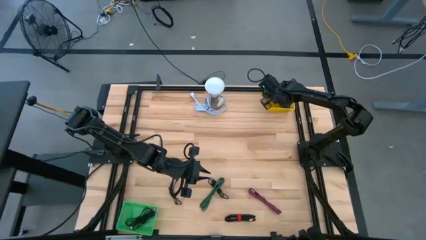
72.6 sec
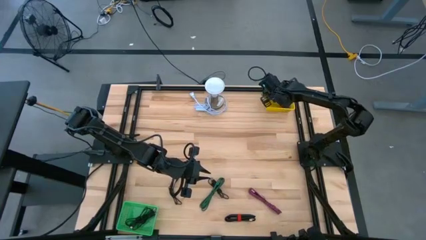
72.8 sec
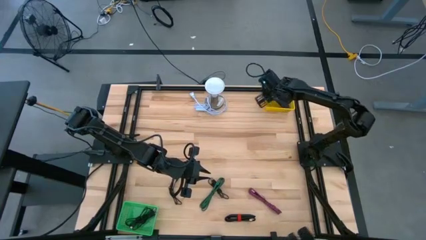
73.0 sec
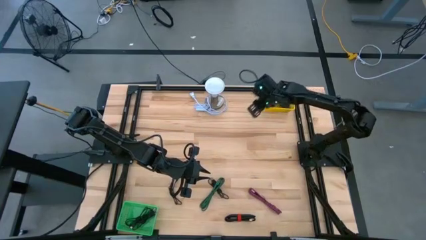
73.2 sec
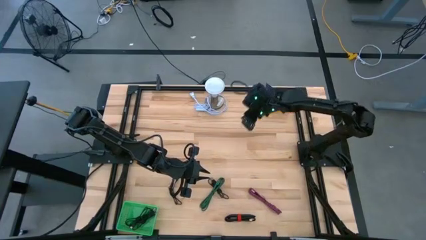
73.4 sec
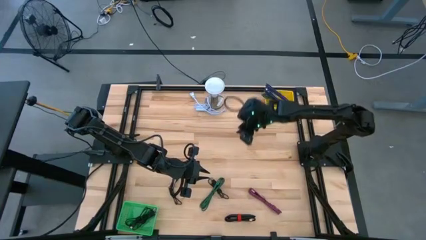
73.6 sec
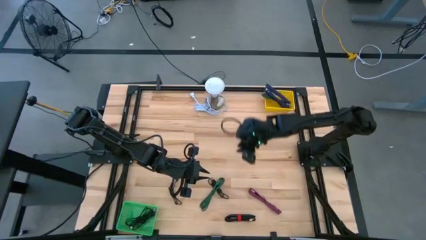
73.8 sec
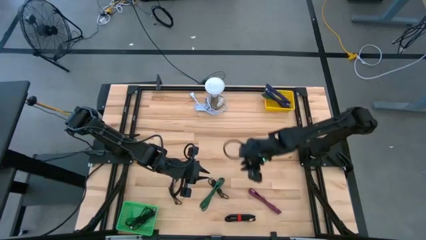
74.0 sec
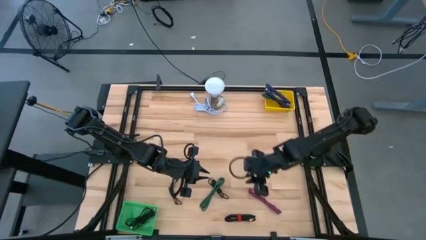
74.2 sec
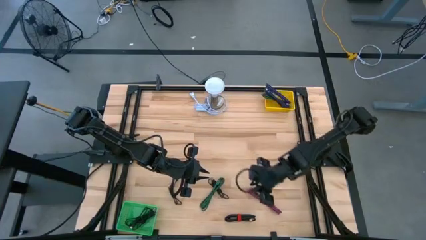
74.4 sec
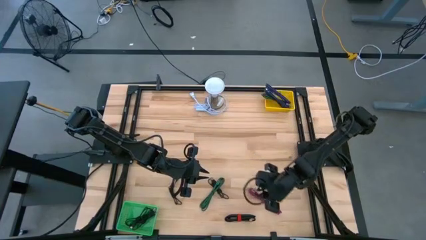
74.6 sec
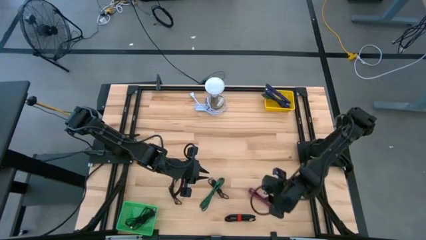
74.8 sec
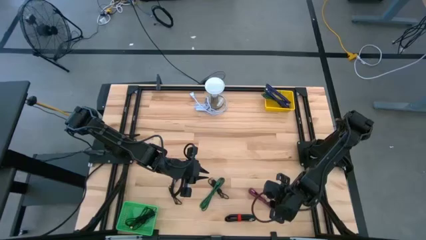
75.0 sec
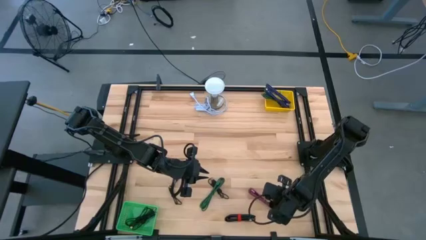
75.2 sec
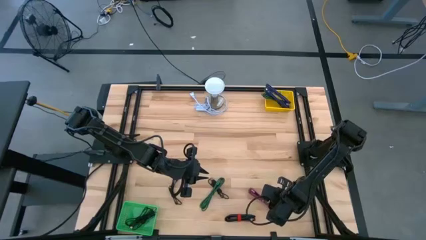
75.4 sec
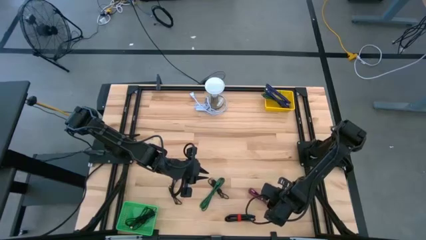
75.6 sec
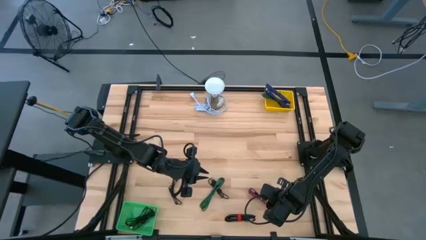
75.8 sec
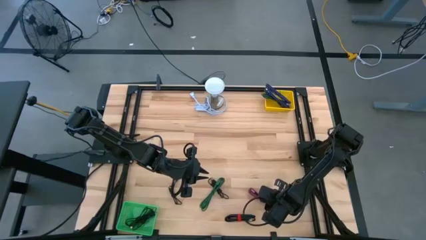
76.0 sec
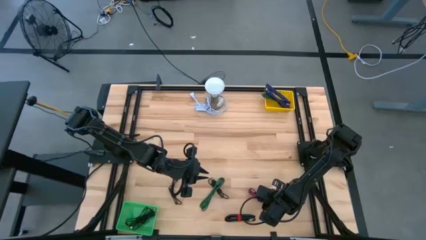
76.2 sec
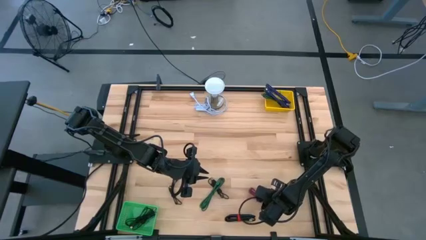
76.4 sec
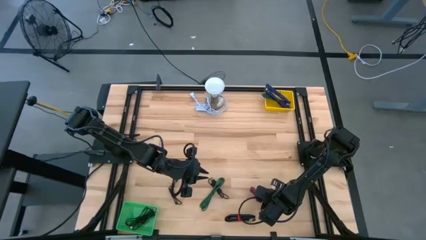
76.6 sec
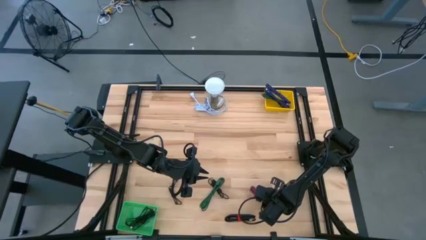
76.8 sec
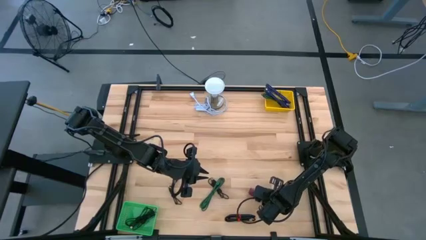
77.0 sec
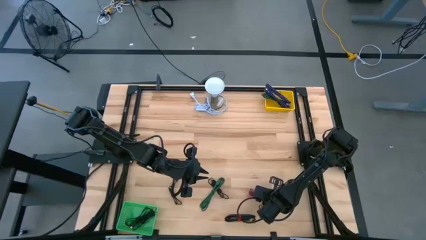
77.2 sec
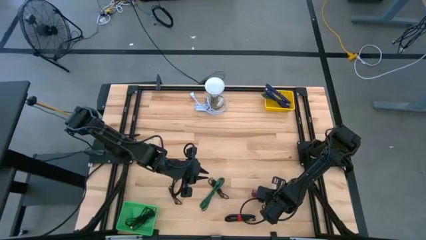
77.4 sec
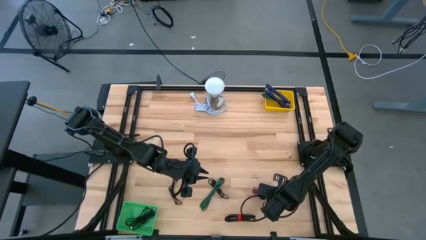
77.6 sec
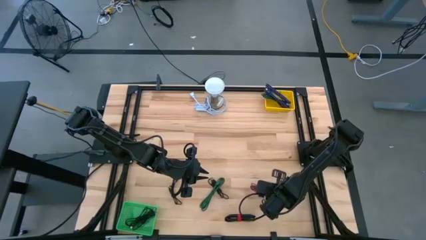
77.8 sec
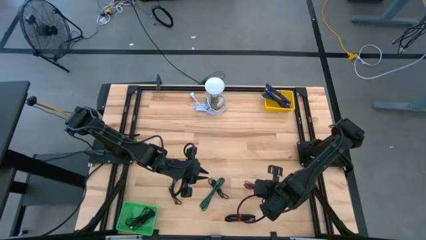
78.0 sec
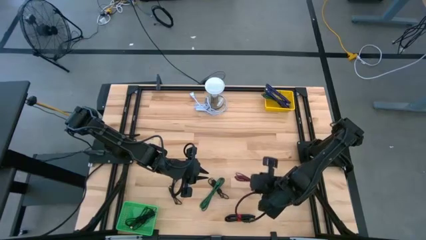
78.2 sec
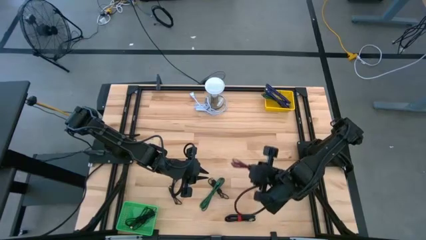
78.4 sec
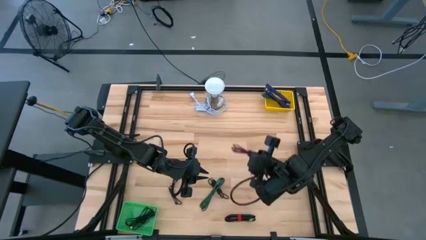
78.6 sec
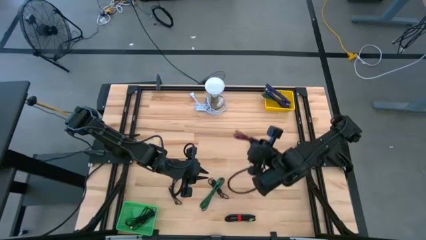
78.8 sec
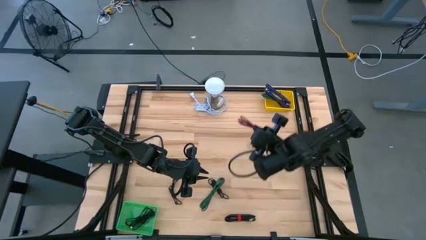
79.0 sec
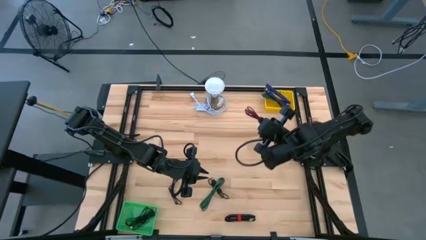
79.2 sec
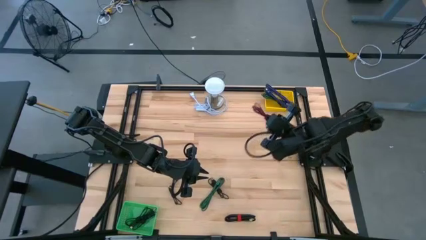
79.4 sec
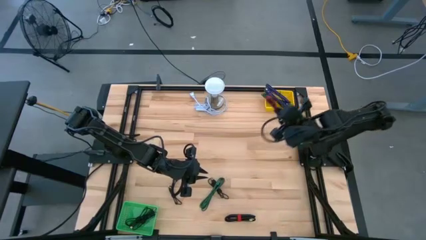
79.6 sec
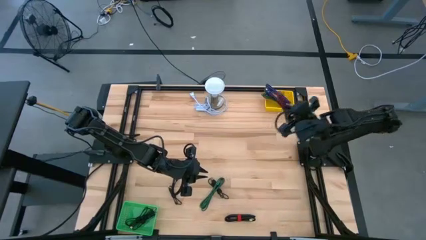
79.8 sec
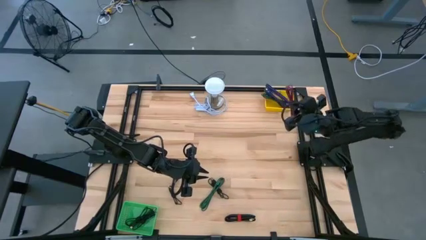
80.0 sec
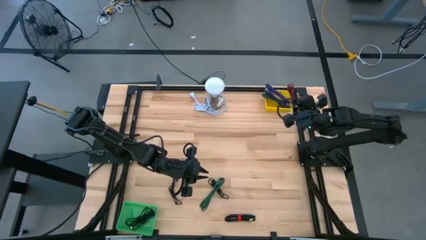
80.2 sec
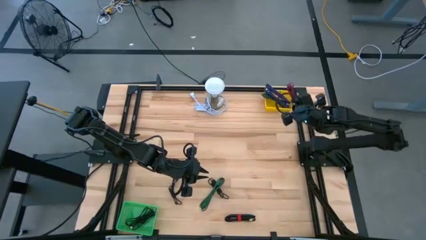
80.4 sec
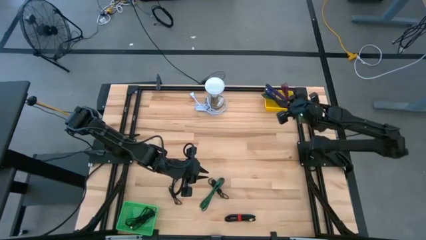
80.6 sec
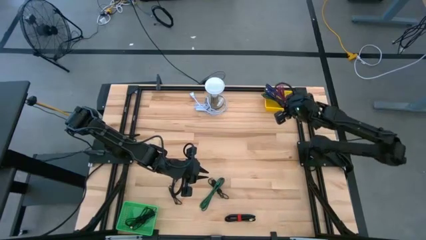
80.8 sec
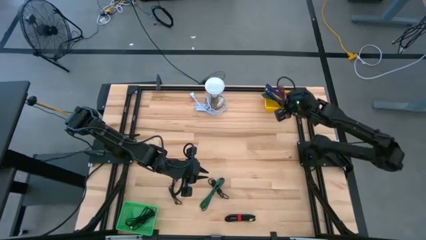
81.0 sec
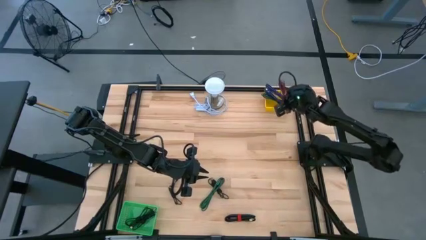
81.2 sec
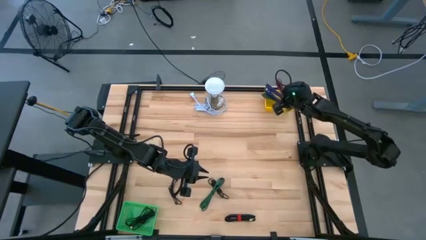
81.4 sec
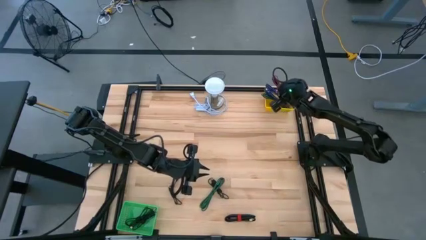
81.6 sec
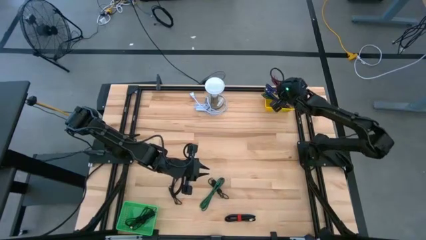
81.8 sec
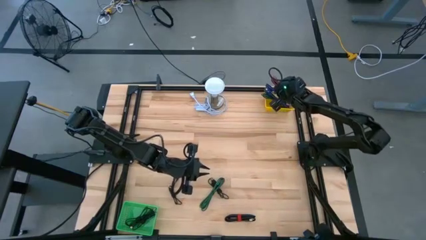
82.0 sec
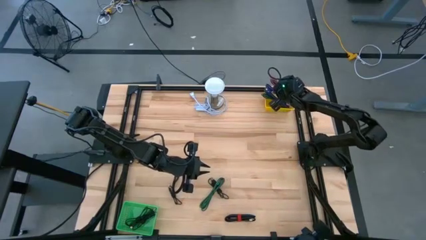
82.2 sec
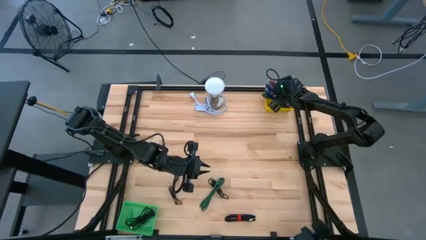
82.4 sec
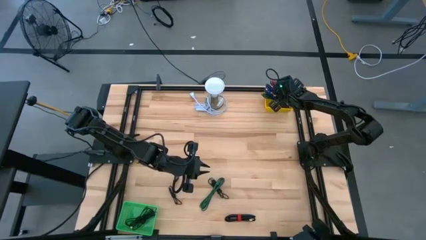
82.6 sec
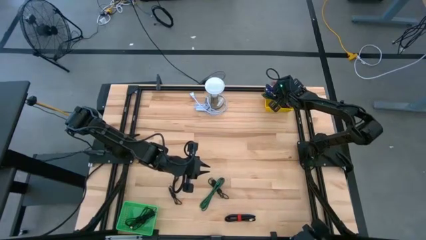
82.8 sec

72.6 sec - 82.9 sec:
Task: Pick & Place USB Port
Put the pink USB cable into the yellow bin

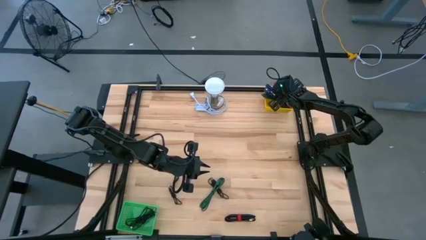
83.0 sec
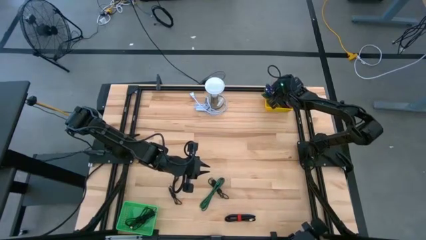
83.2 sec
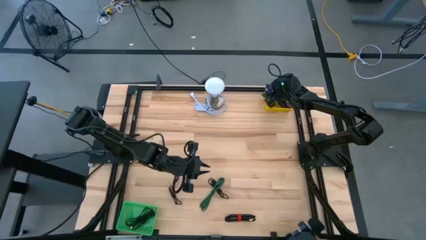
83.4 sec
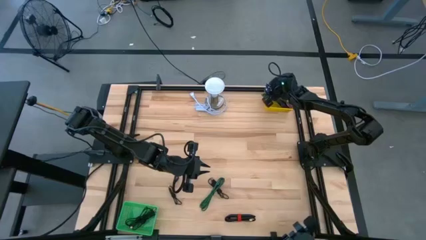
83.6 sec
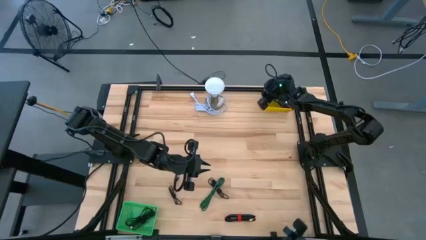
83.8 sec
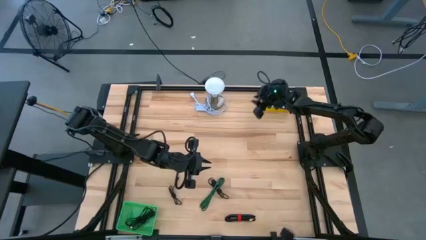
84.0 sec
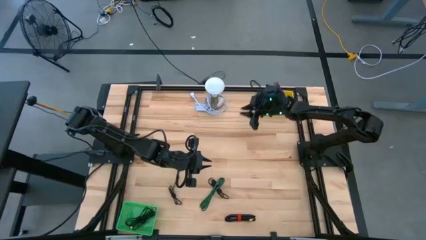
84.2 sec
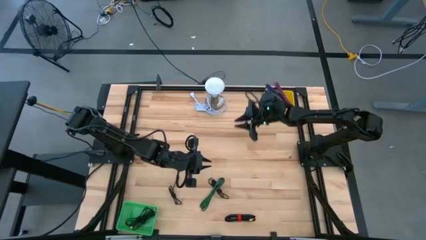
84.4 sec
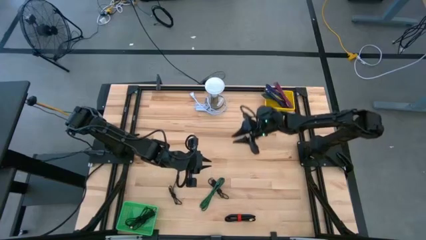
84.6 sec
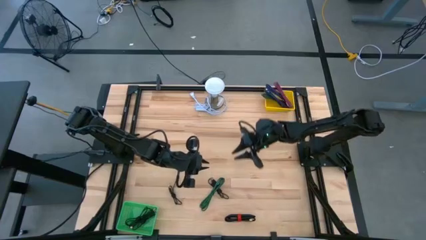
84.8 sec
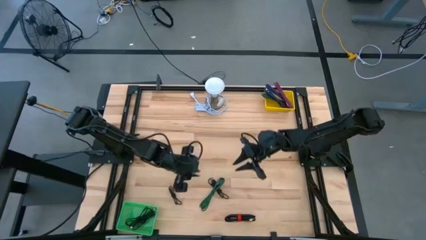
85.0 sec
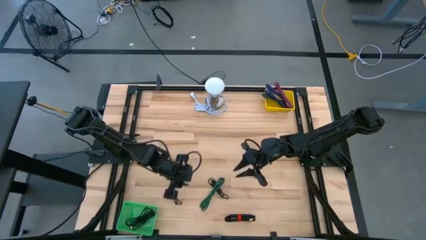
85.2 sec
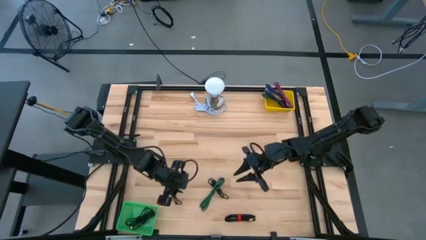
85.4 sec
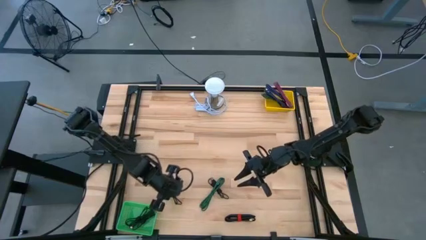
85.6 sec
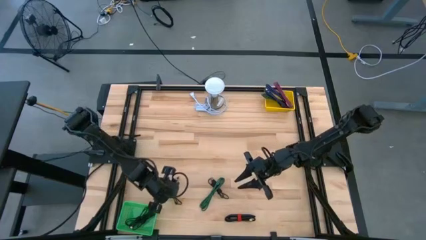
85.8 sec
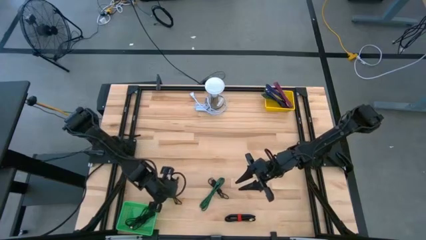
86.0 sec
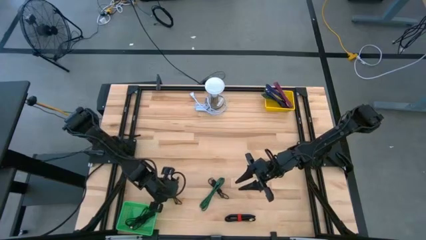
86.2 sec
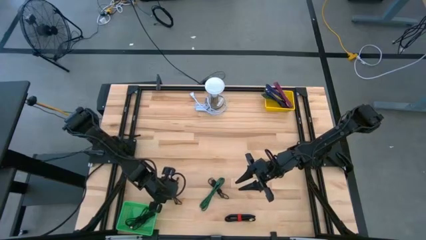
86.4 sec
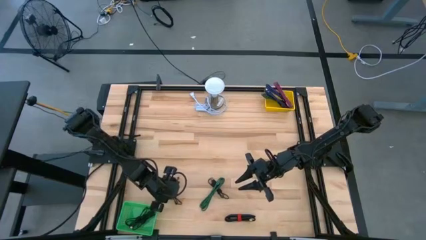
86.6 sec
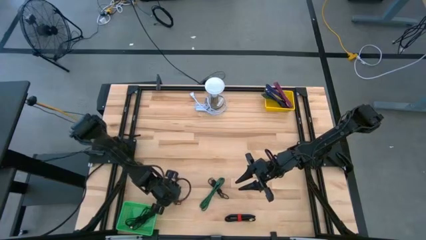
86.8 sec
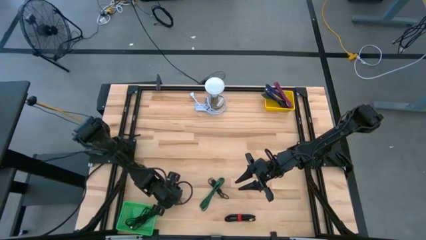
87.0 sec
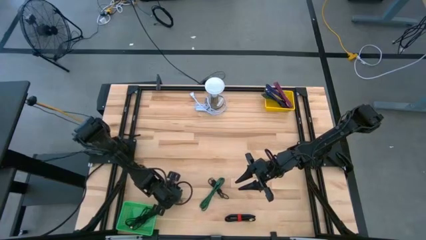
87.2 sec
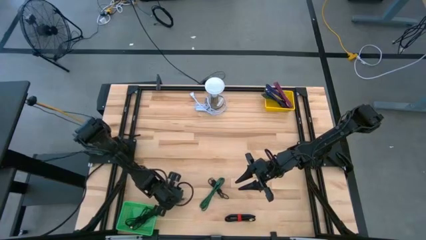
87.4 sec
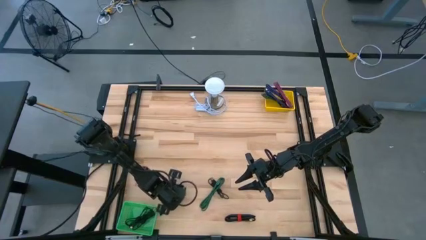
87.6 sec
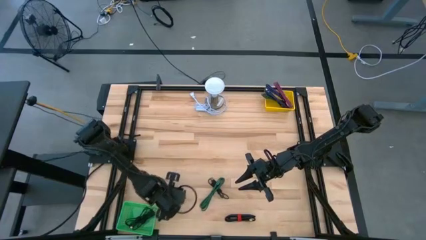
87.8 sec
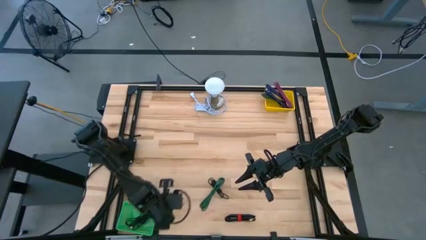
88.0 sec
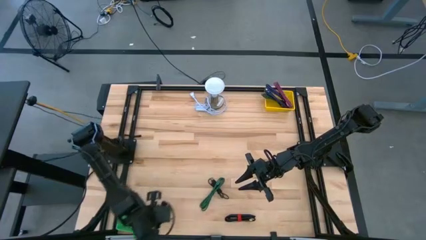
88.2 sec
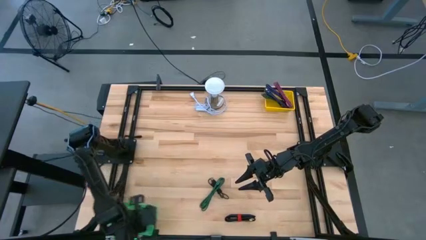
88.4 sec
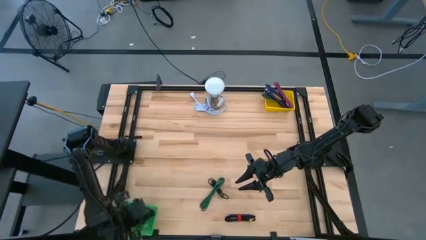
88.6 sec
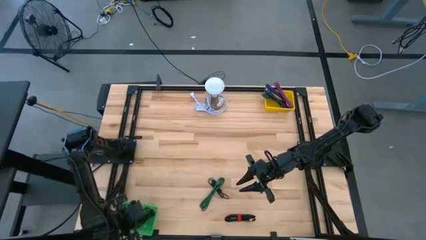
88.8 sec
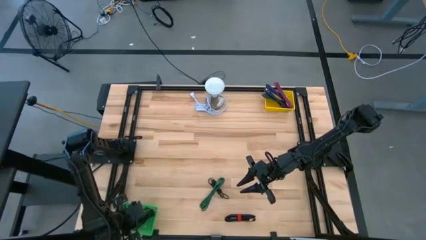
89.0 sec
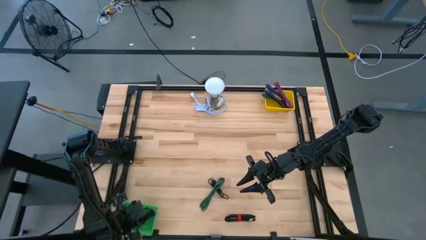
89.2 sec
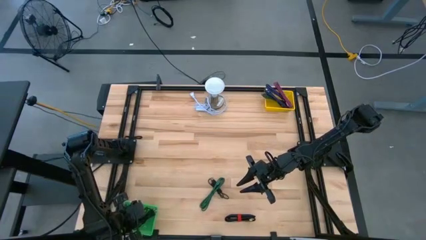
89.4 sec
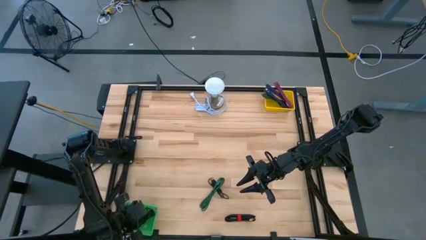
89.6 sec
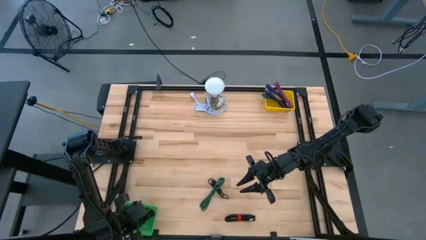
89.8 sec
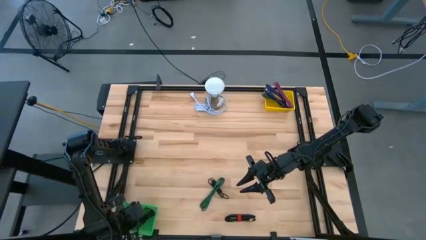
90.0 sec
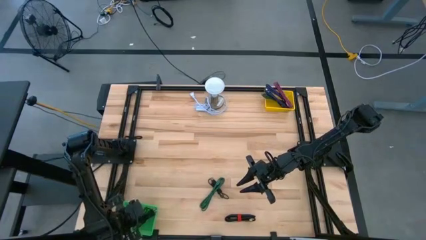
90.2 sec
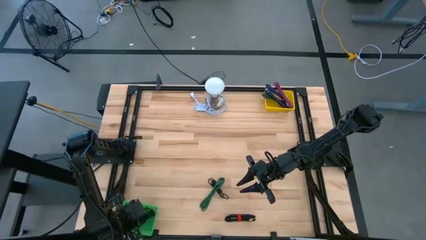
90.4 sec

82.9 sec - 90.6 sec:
Put the black USB cable into the green bin
